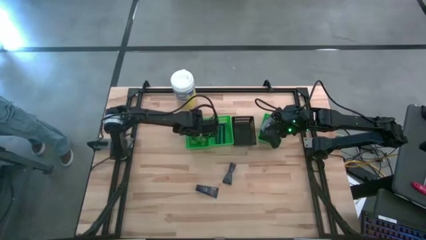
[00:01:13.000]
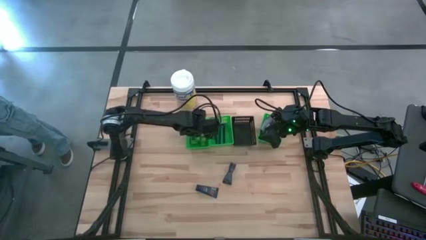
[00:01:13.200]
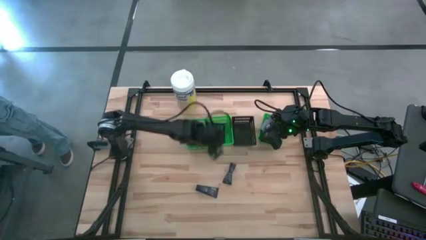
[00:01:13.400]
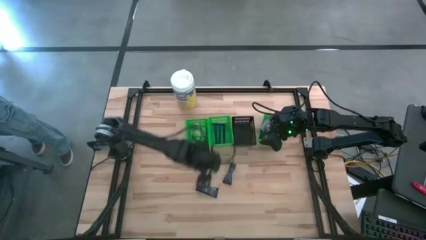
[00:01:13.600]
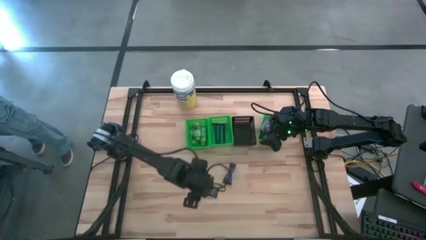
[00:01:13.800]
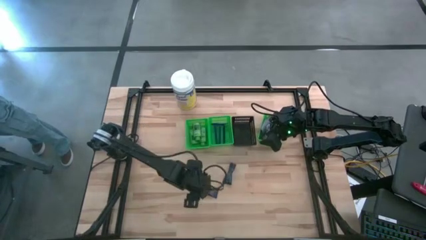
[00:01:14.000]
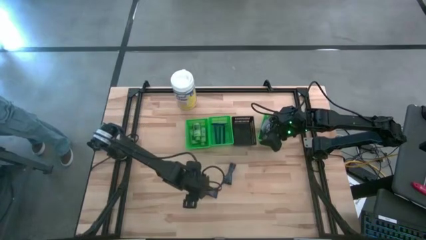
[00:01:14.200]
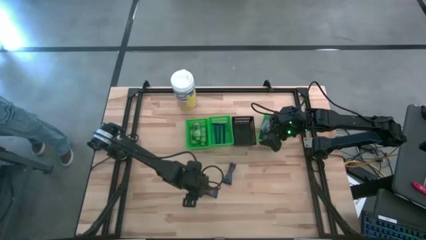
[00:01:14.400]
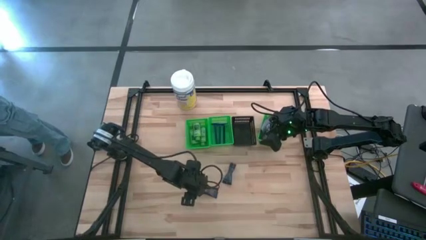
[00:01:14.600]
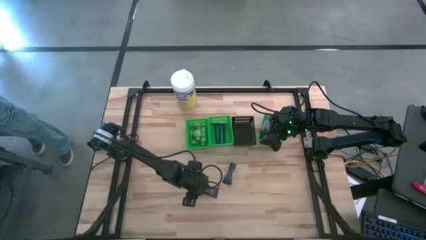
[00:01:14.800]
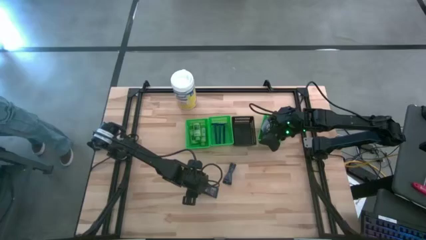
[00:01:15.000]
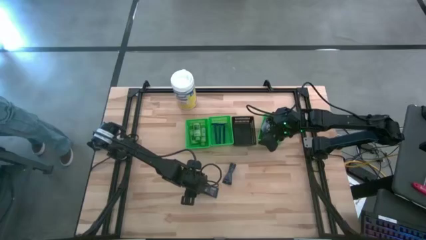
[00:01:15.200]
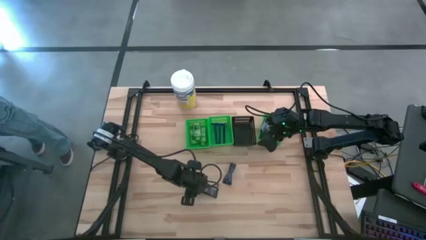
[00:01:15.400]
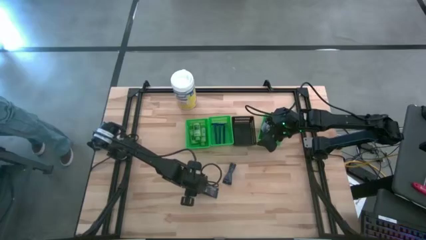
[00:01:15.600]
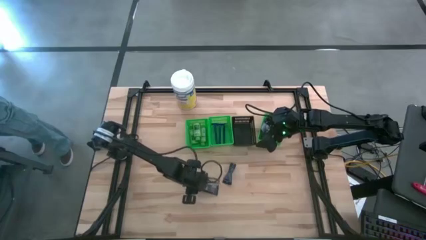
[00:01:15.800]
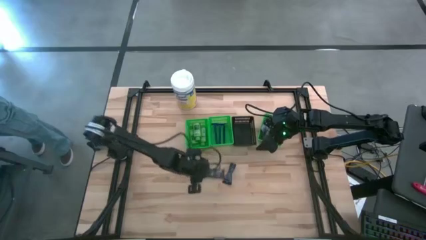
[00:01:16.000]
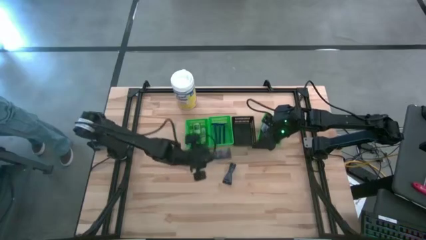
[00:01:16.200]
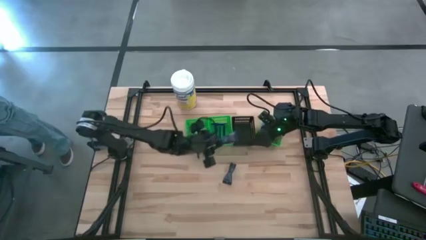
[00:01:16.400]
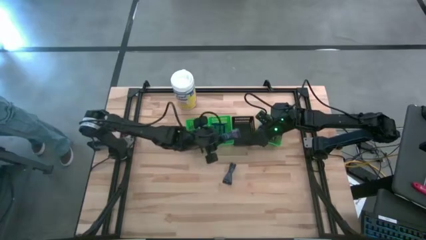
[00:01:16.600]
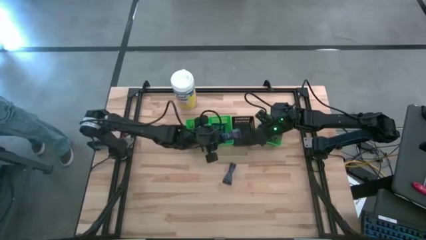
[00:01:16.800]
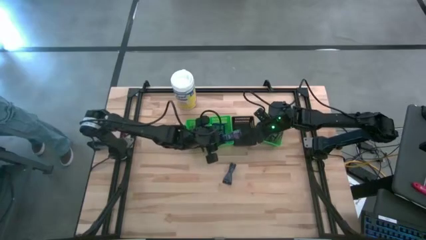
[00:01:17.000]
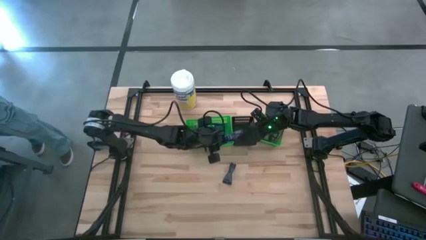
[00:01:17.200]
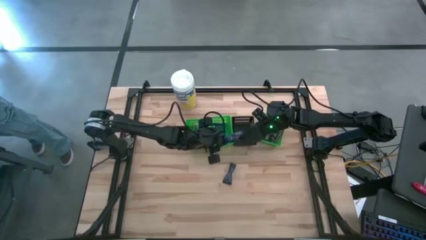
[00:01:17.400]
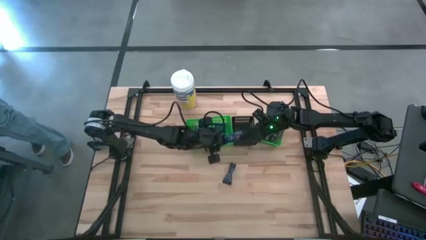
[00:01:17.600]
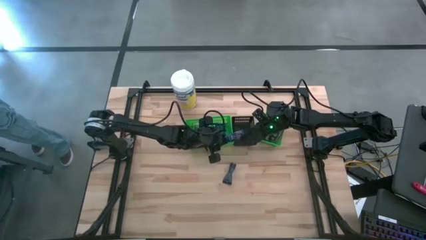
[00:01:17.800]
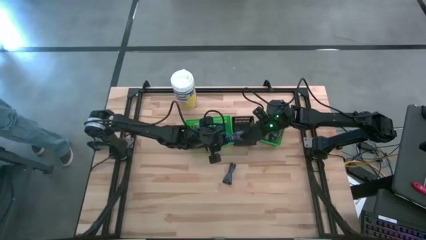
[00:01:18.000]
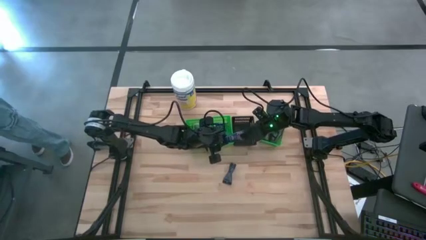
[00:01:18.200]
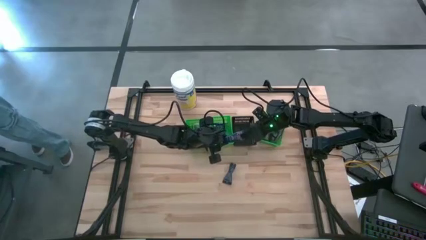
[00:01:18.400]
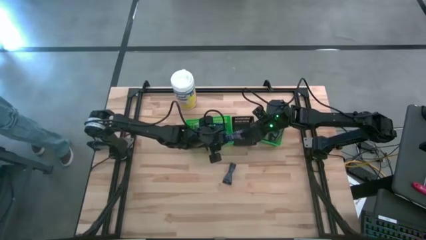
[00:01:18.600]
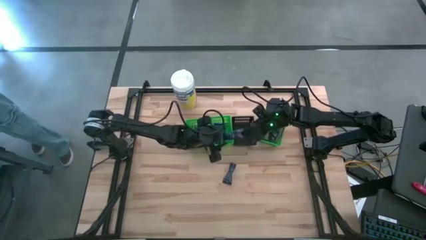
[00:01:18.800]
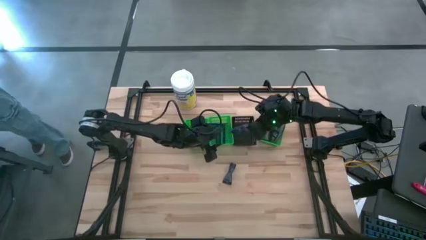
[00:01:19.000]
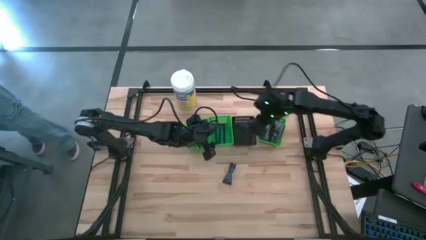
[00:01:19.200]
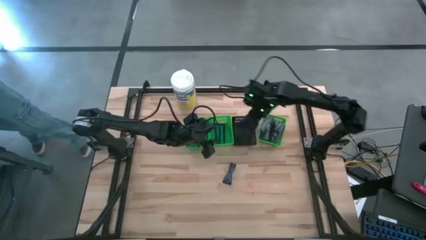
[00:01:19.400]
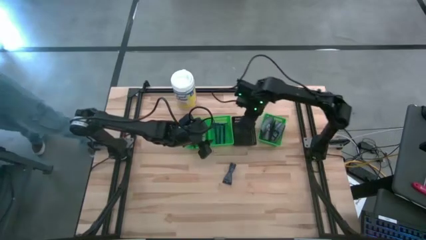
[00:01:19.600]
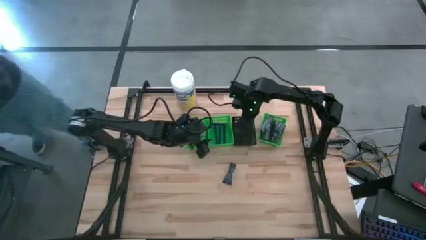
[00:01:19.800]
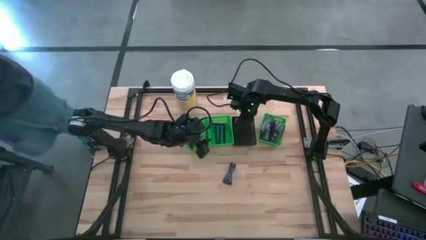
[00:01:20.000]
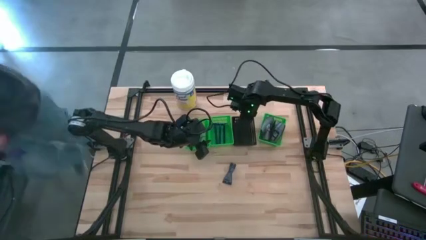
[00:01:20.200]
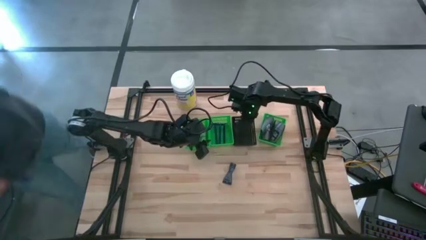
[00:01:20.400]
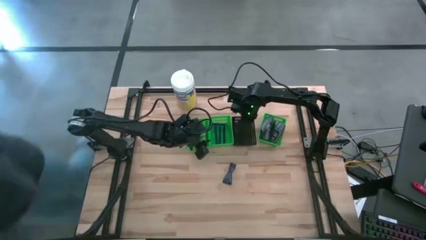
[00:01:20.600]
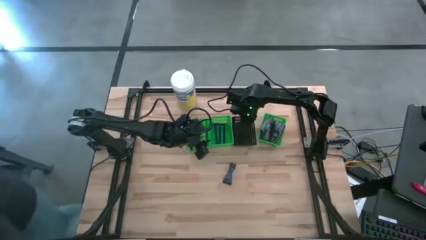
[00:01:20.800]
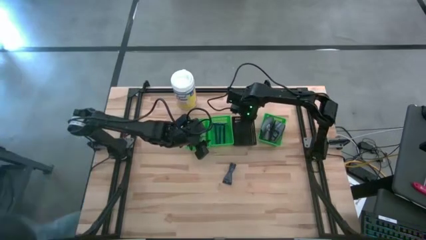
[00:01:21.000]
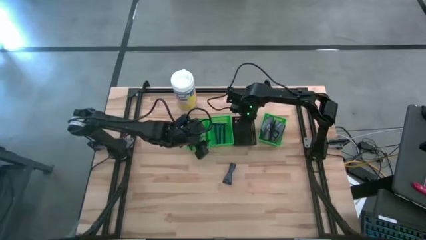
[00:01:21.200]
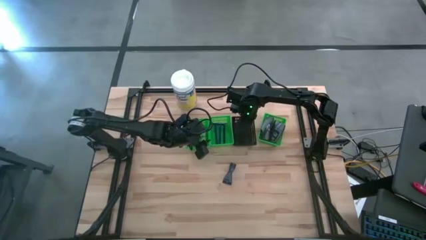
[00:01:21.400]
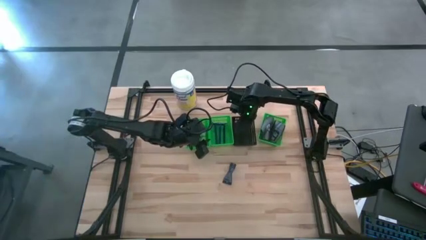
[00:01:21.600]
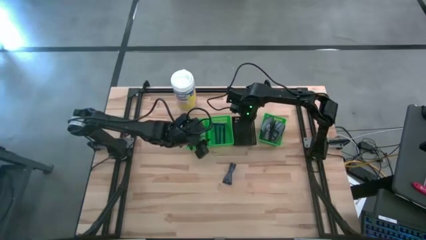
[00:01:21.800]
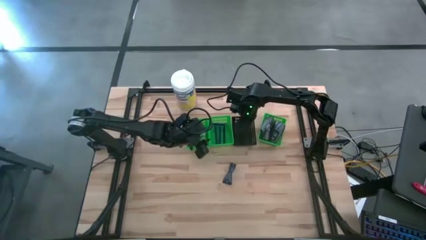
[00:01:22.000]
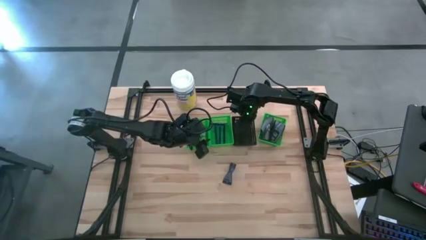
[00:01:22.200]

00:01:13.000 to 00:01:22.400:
Task: Pick & Place Travel size toiletries
Put the left shaving cream into the black bin

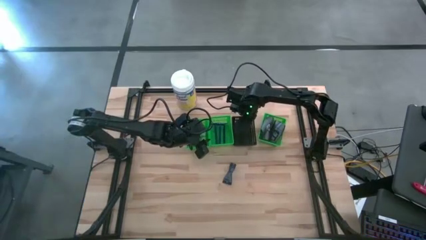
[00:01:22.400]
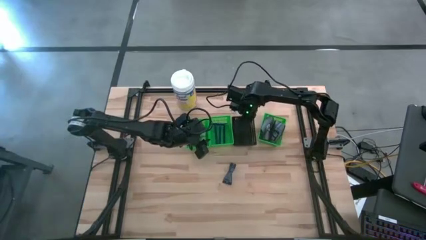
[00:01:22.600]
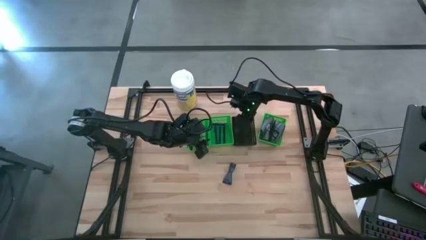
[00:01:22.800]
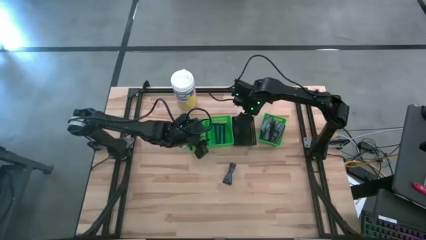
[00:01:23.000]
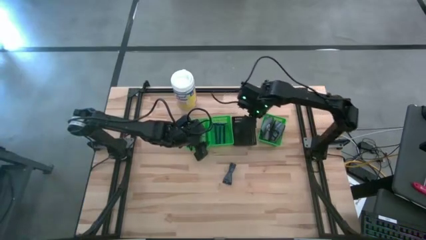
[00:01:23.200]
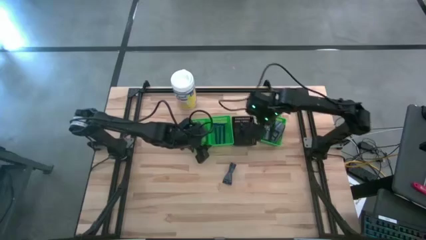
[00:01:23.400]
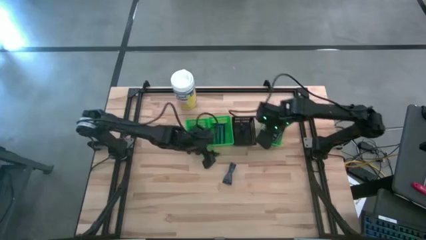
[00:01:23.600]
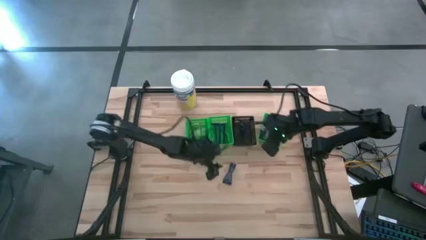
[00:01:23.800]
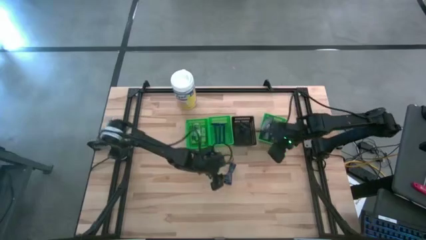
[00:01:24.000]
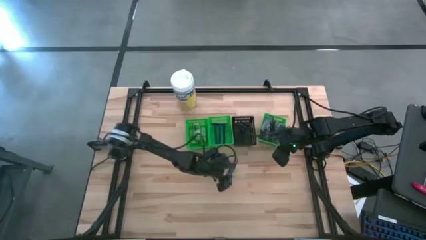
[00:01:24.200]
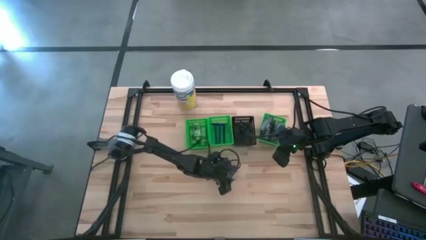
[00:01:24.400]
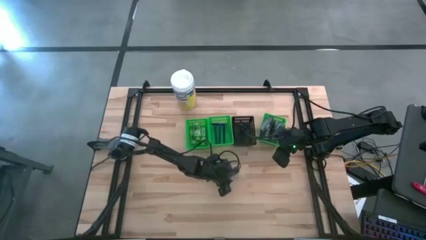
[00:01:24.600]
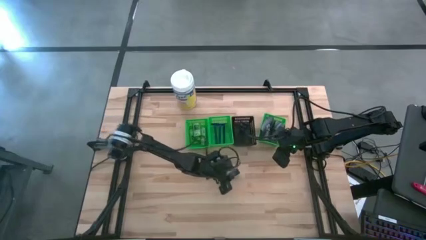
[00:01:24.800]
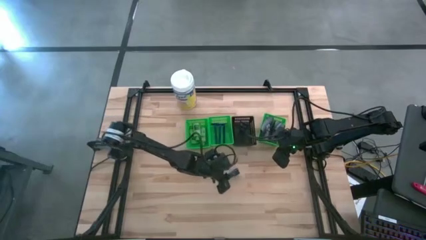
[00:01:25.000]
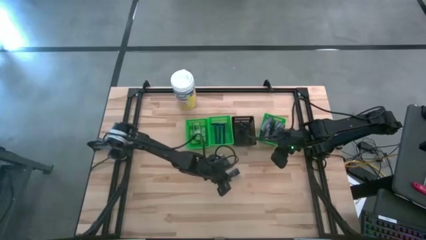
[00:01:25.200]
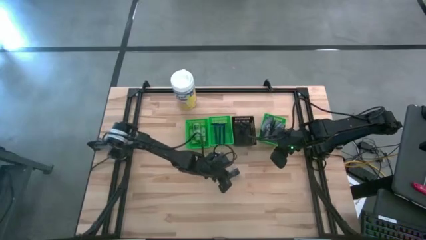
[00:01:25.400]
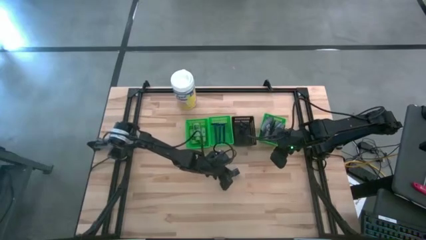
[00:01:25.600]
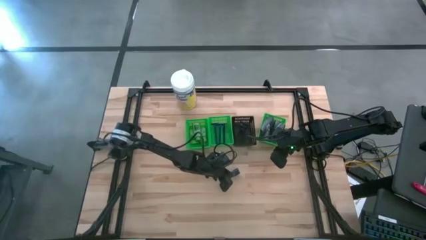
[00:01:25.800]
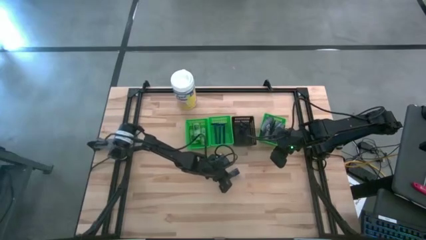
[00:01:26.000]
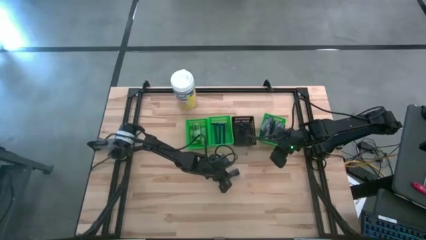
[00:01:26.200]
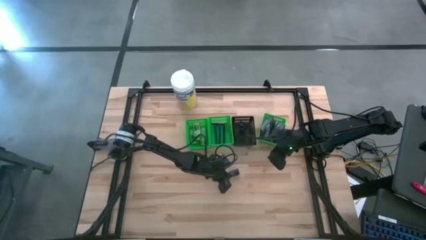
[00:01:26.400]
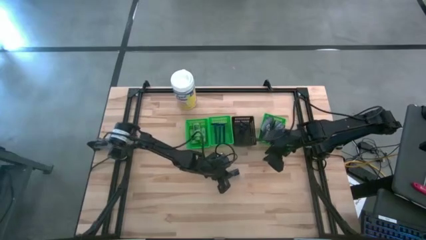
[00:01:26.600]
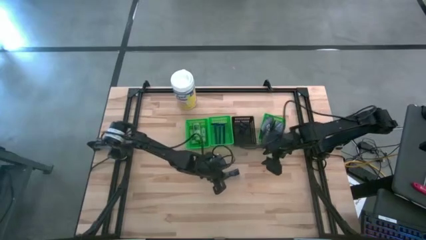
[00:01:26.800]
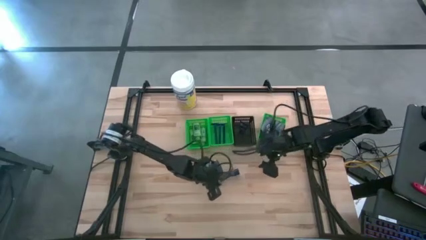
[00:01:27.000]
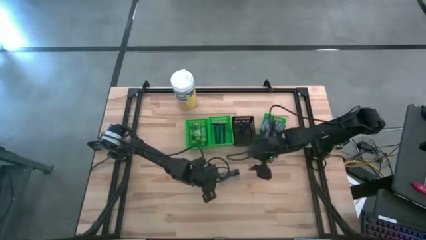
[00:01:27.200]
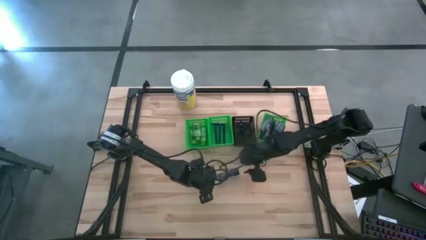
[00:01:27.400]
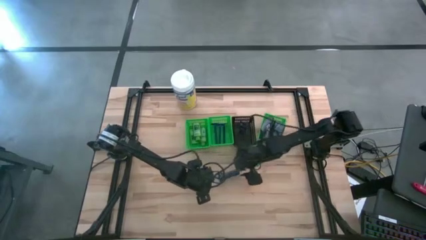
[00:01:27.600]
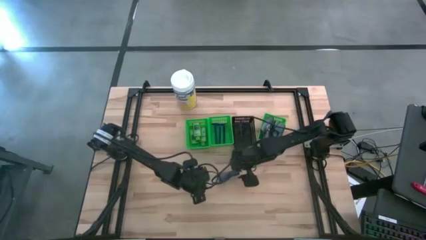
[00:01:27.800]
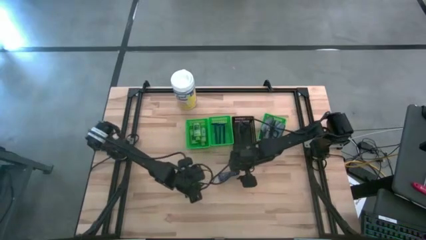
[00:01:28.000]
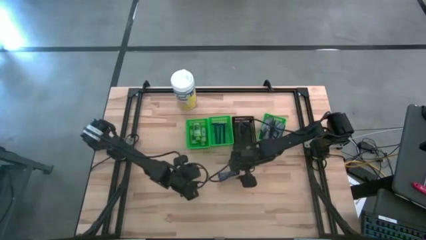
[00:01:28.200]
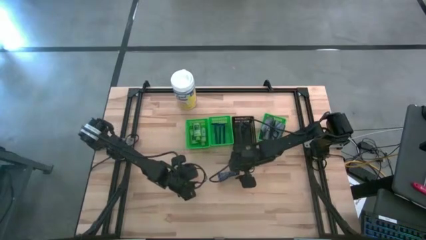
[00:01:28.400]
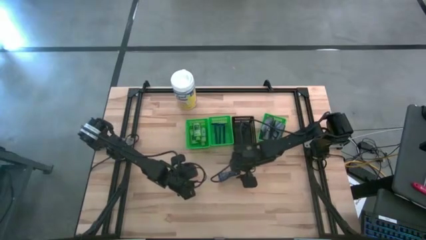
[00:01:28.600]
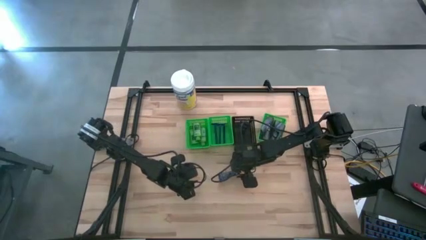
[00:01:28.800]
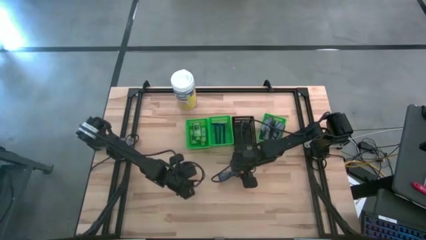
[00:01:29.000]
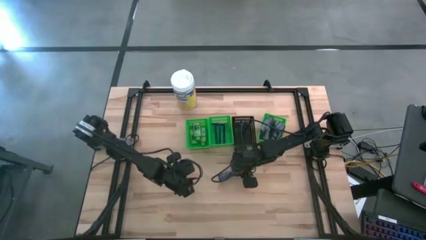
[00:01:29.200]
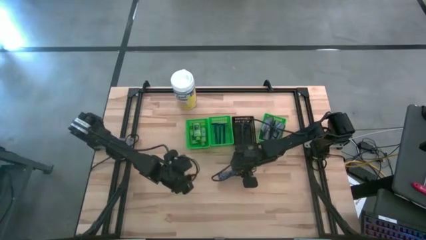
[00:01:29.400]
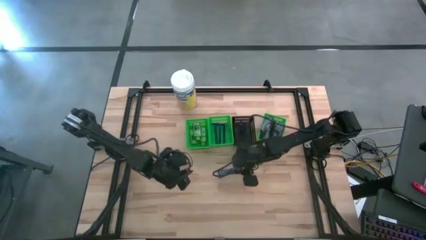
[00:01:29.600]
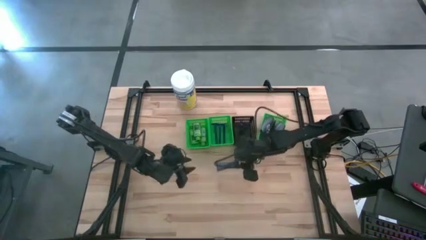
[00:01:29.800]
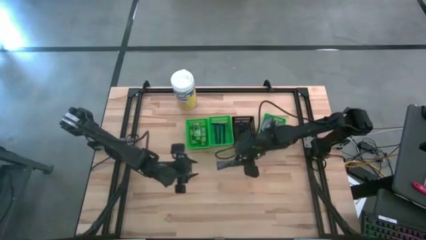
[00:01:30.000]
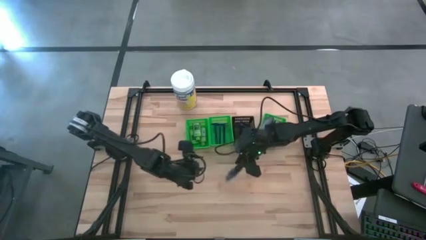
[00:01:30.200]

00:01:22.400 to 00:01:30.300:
Put the shaving cream into the black bin
